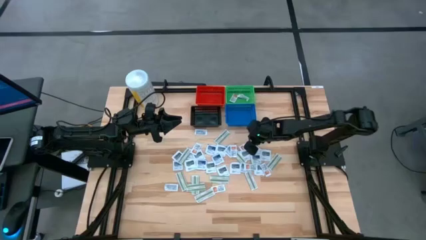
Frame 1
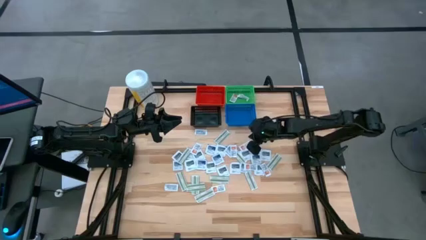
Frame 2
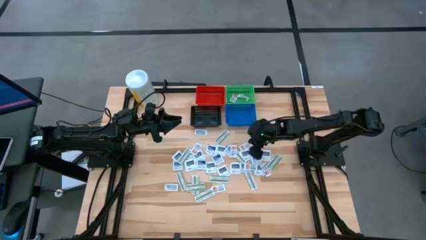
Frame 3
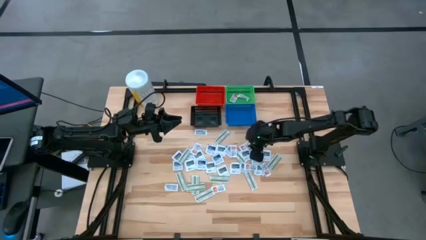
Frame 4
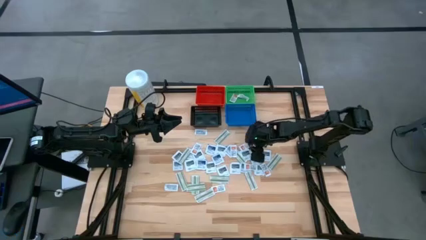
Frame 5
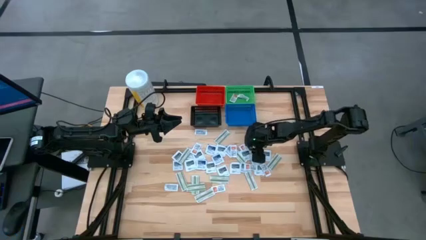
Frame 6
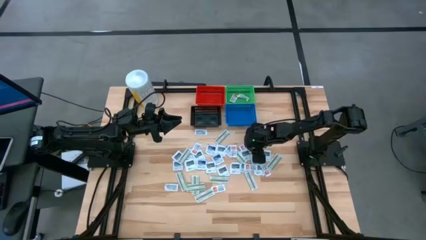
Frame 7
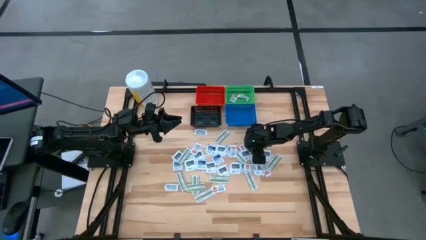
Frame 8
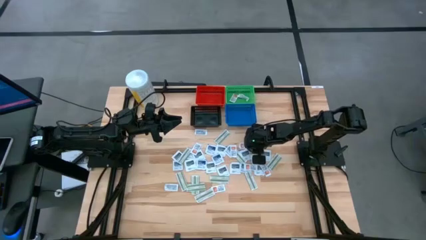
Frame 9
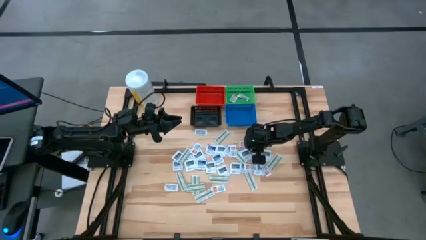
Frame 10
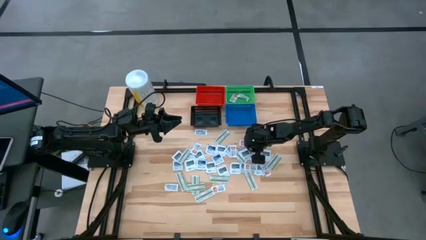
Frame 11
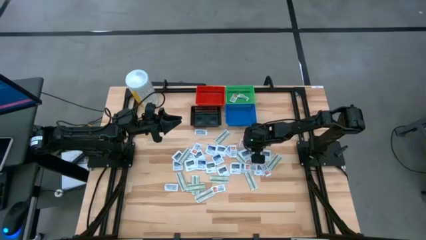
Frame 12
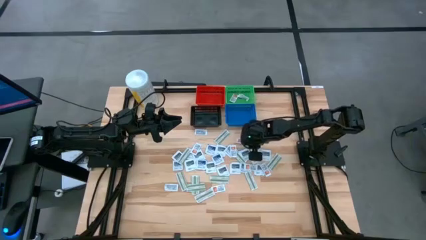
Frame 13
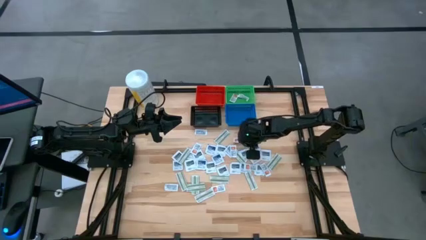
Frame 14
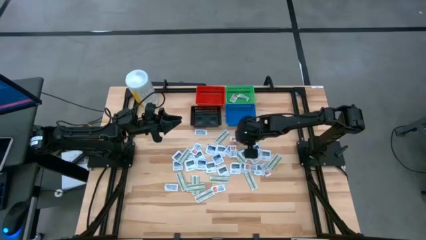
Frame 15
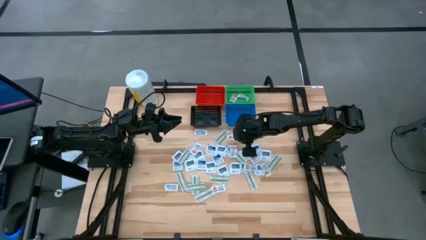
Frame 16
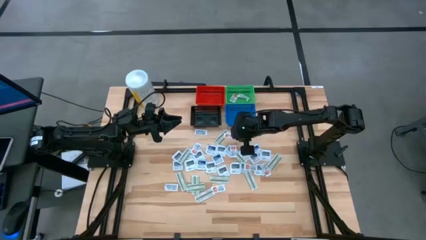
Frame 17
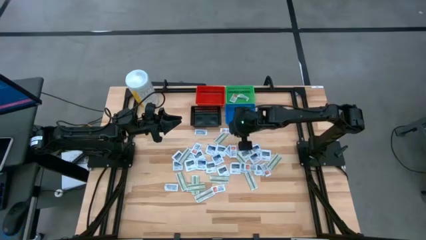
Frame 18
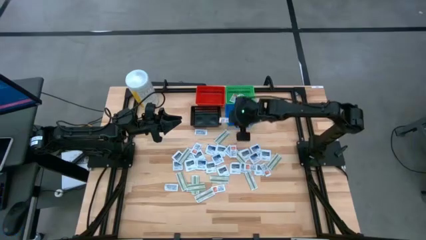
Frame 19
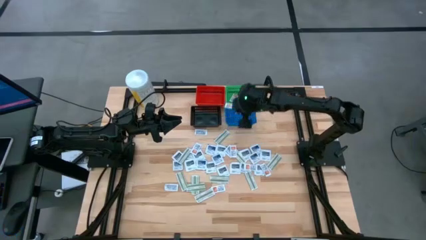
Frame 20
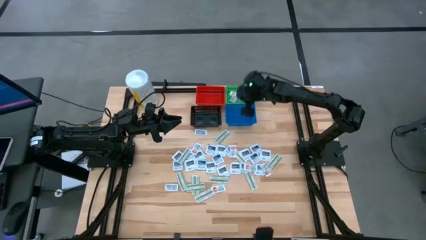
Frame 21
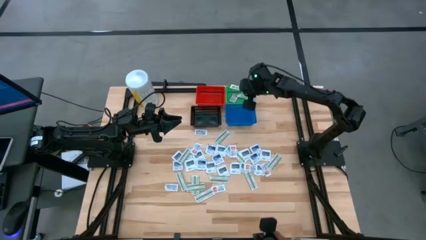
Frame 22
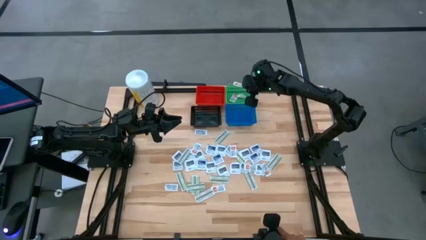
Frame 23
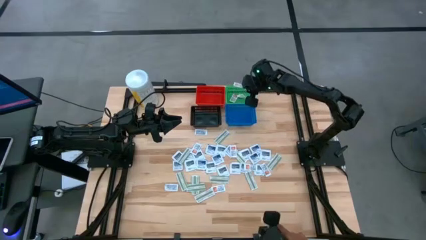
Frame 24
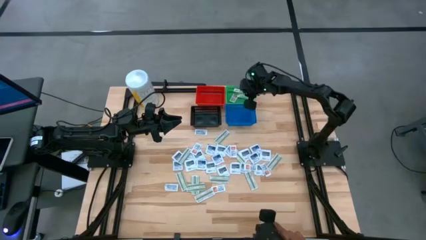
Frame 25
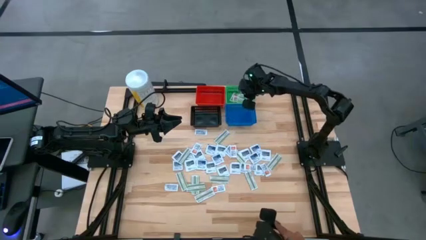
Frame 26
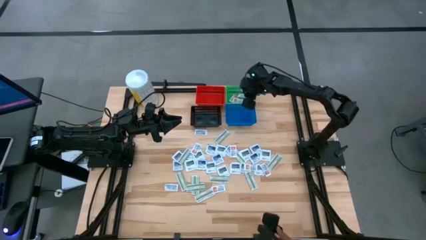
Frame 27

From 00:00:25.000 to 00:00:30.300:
Task: Pick & Place First Aid Supplies
Put the ointment pack into the green basket

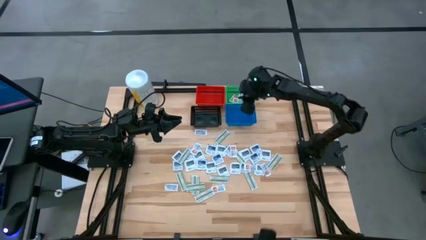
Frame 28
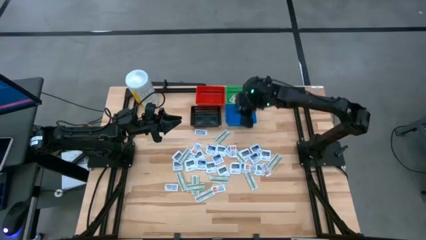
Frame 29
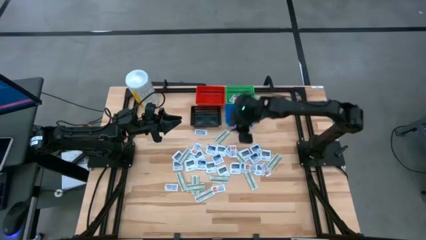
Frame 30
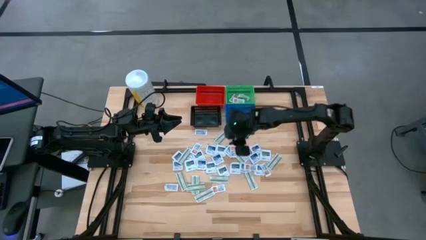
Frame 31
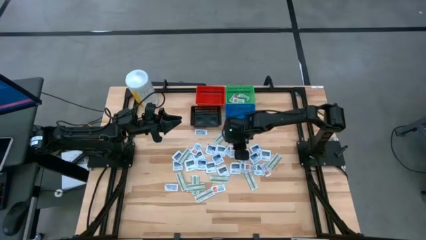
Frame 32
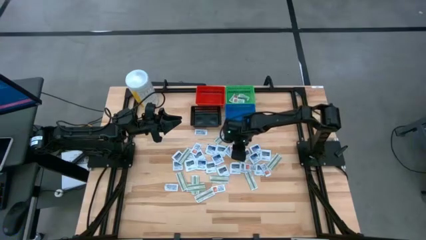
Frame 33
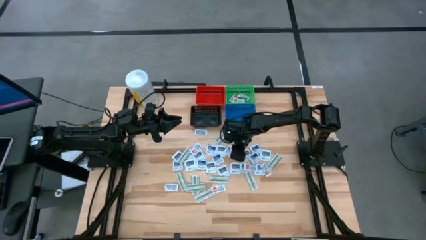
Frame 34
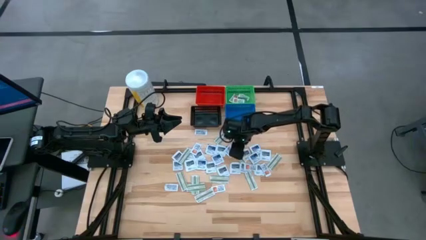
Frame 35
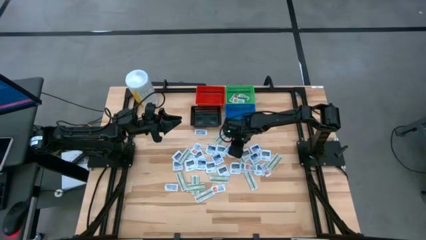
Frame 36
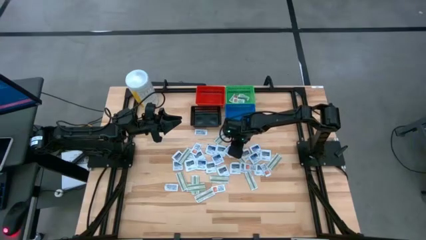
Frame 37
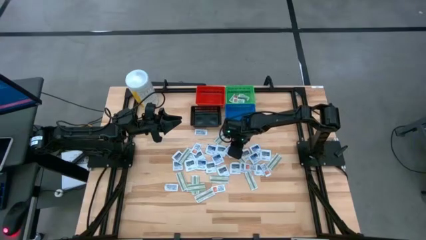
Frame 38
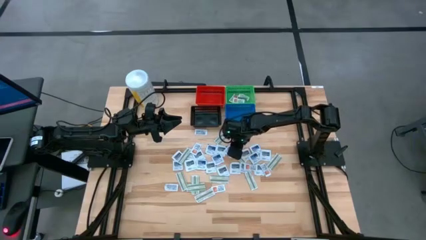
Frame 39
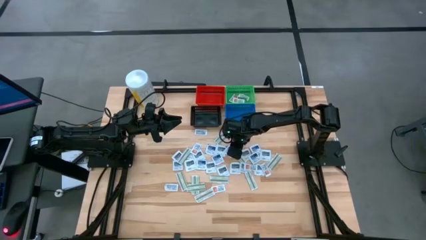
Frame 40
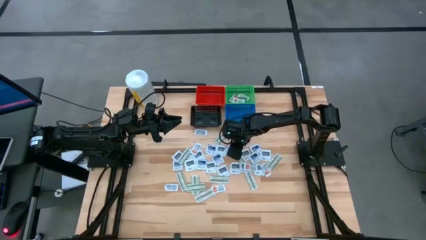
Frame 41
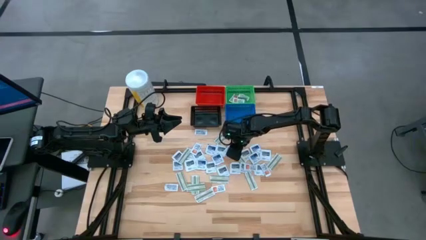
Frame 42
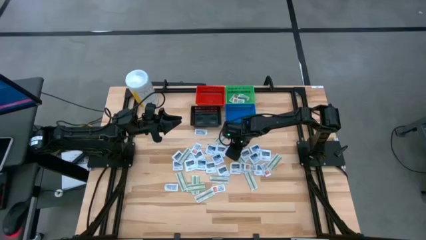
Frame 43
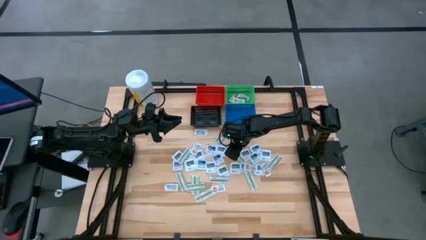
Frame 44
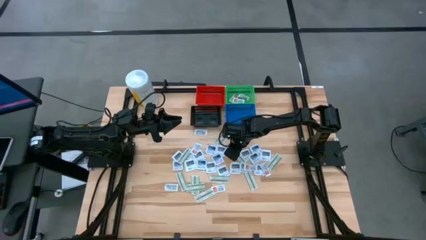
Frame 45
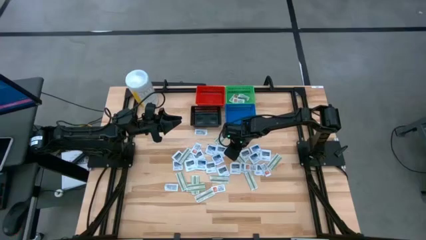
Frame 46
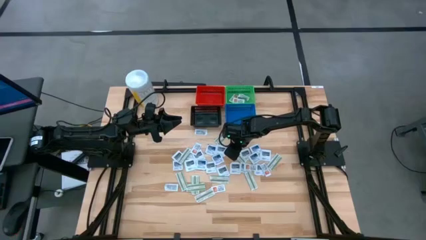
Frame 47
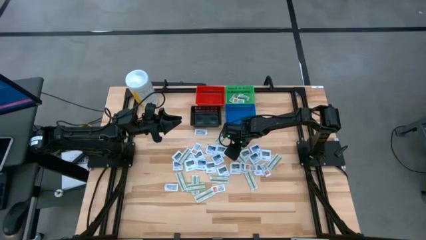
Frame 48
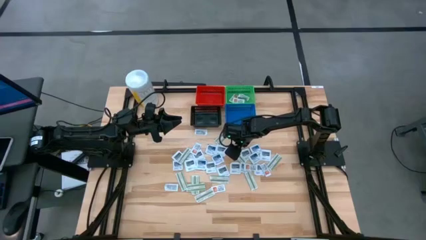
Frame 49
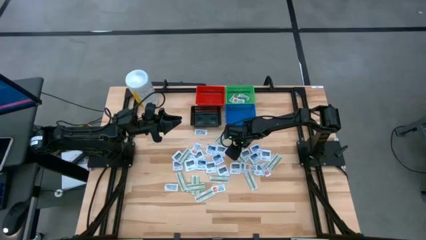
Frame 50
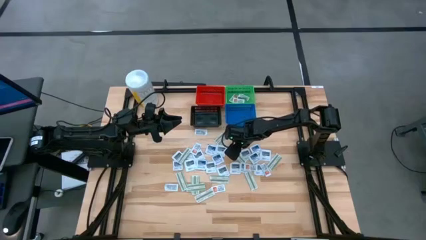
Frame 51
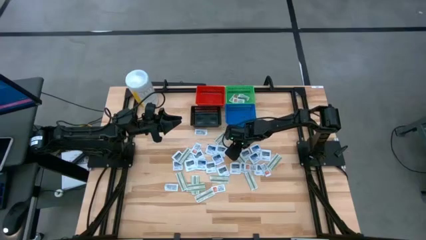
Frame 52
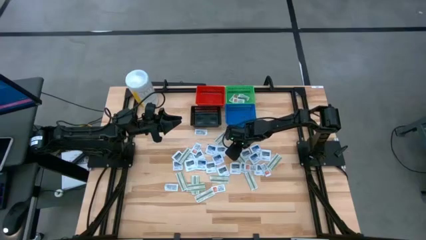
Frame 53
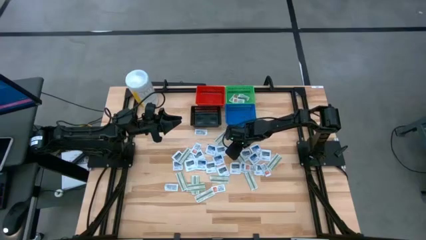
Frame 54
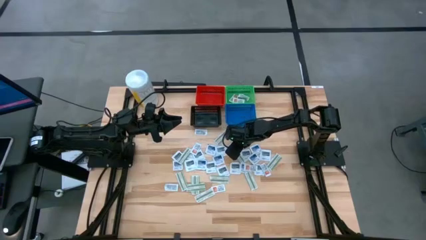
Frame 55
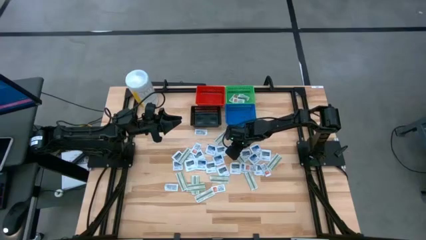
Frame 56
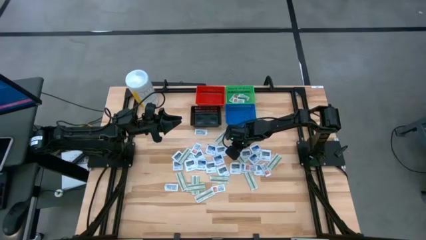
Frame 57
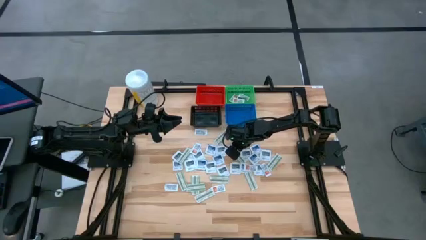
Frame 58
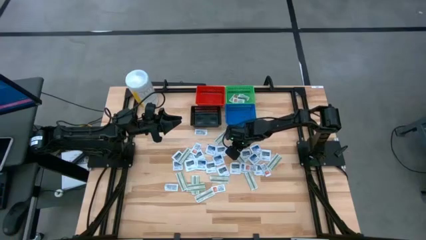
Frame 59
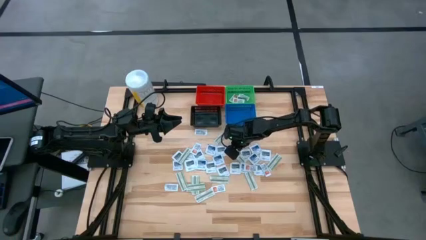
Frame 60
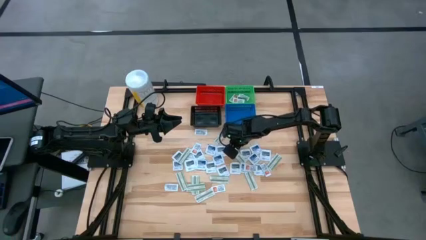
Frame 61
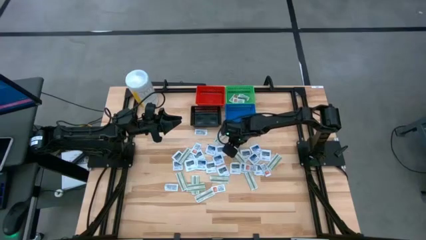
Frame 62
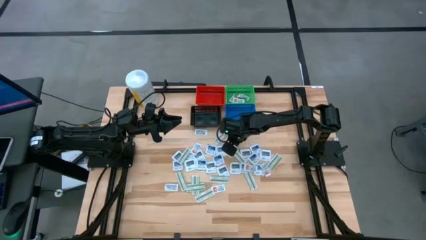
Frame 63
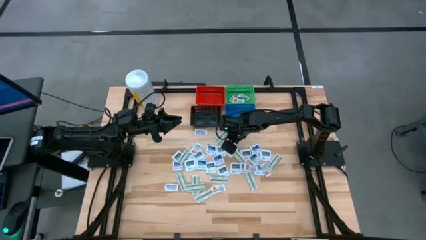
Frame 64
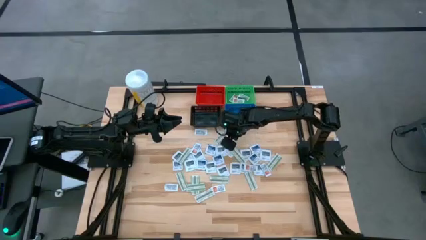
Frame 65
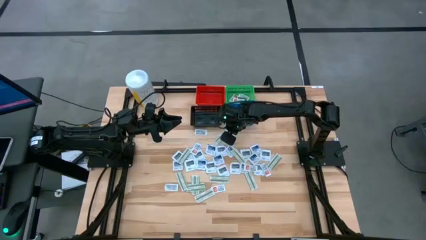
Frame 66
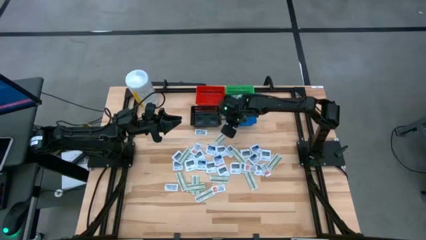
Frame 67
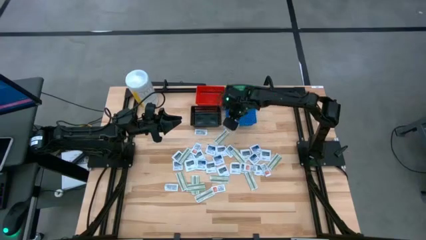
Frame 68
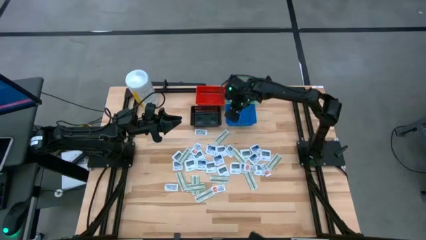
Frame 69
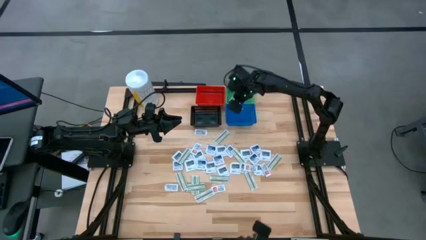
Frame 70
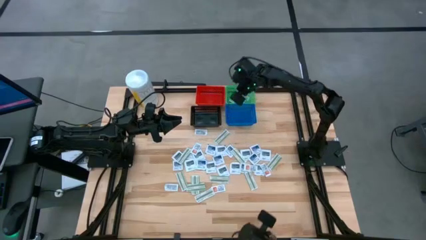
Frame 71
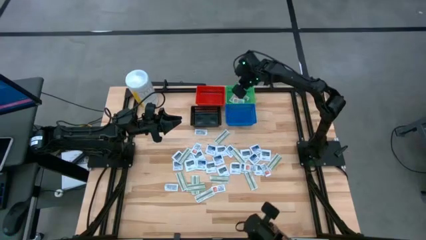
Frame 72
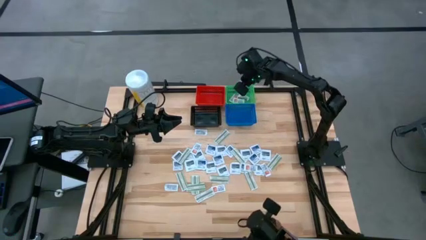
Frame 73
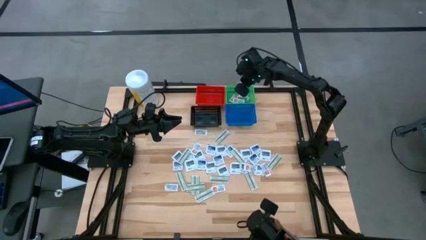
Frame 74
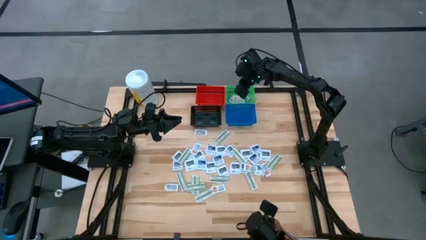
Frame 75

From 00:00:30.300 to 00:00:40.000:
Put the ointment pack into the green basket
